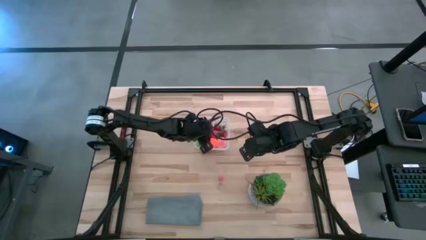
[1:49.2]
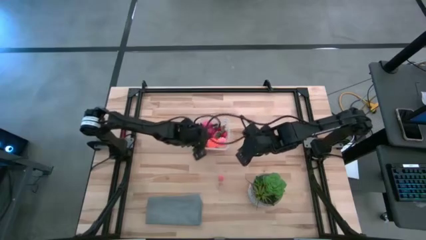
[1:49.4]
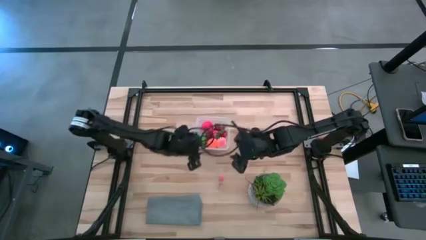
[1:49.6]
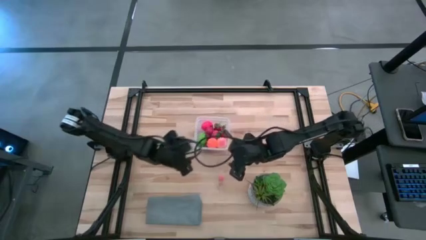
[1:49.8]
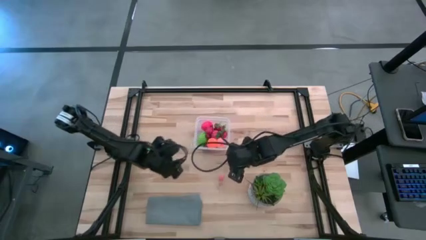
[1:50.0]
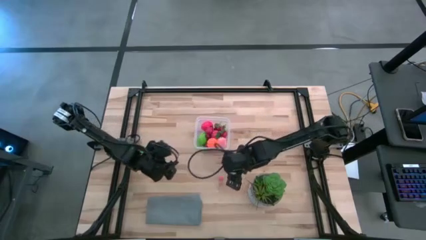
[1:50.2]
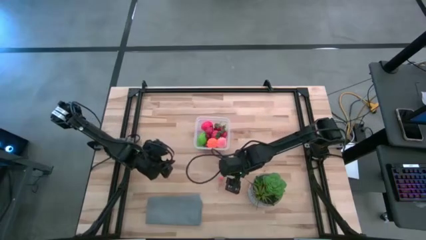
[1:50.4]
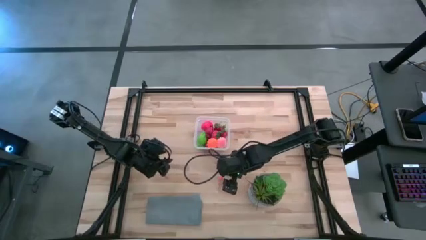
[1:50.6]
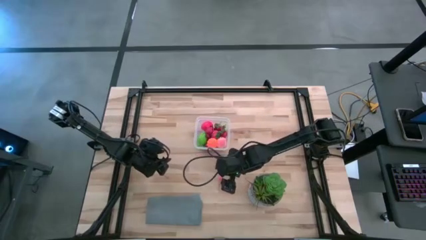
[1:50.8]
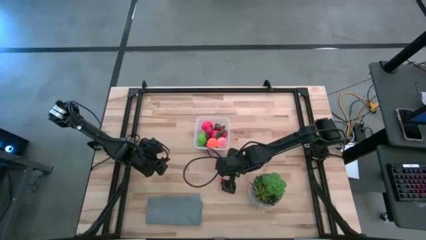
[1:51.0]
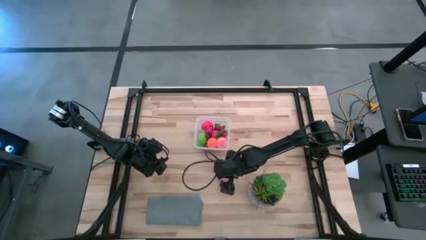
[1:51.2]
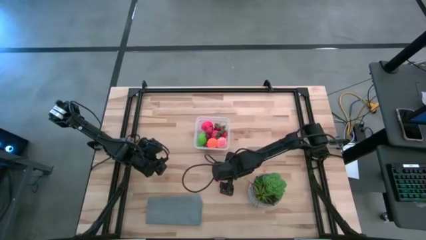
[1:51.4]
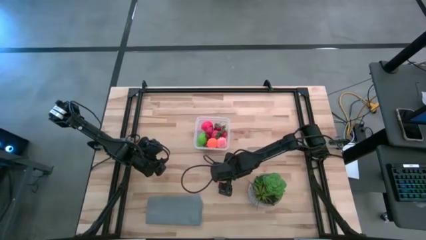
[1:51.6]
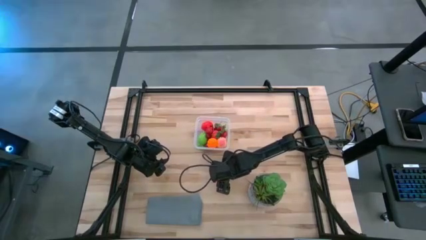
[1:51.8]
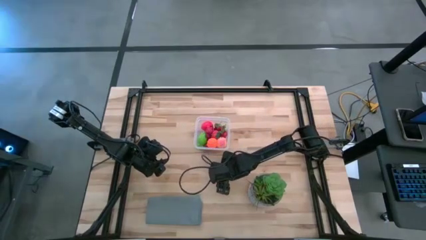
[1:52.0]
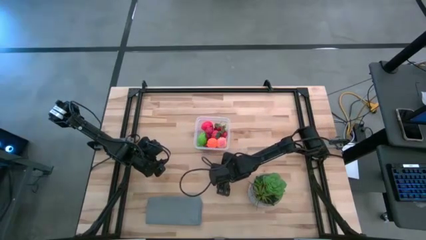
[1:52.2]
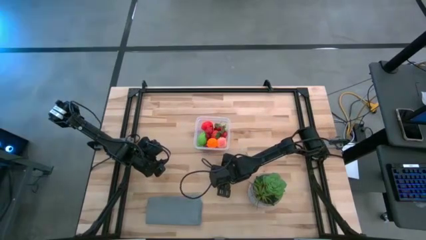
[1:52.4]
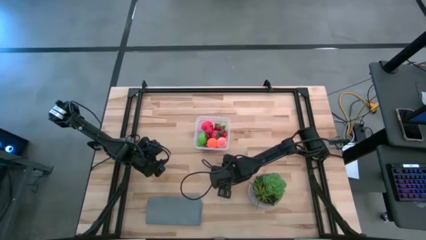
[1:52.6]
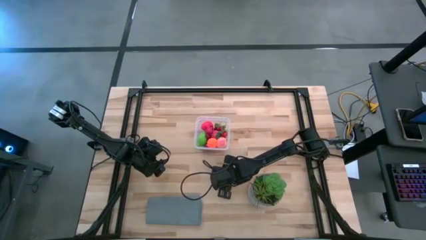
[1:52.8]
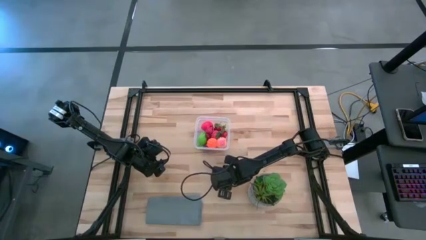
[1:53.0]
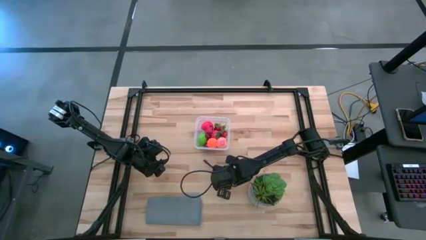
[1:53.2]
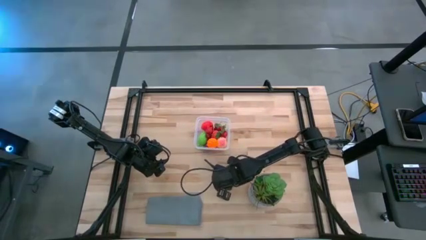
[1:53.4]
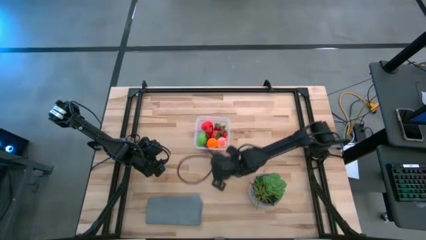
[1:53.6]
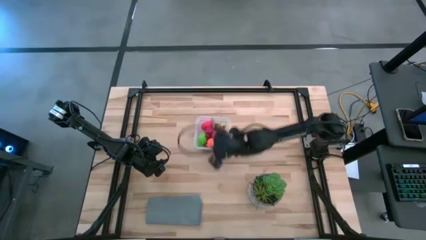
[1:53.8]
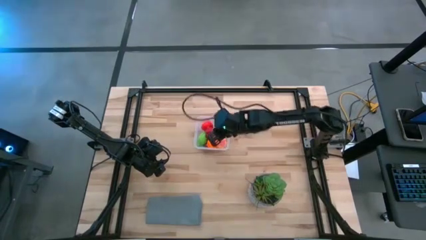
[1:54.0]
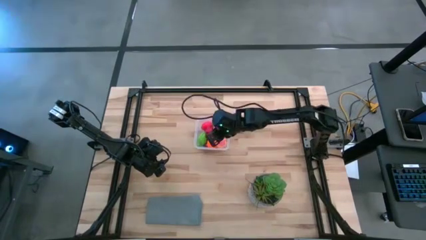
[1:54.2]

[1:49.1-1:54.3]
Task: Pick and placing Produce into tupperware
Put the pink peach into the transparent bin

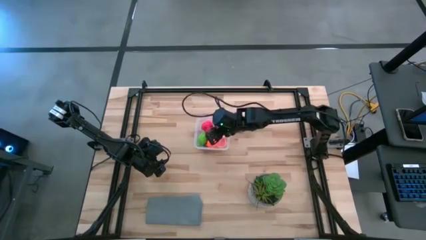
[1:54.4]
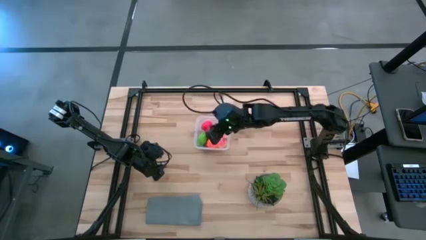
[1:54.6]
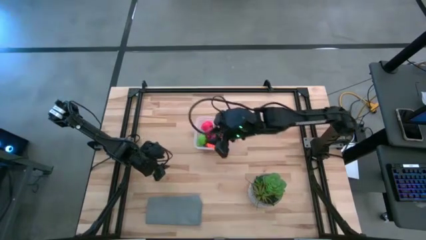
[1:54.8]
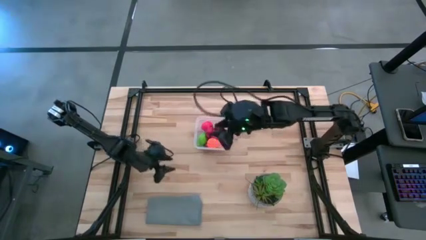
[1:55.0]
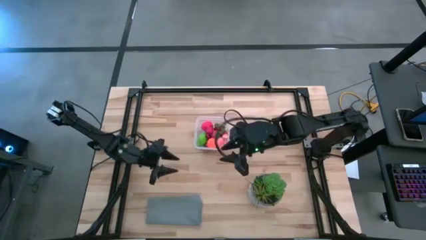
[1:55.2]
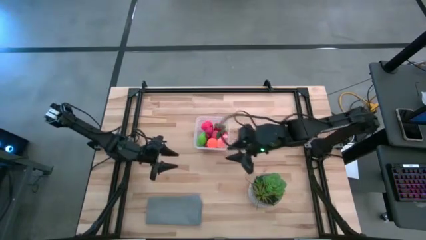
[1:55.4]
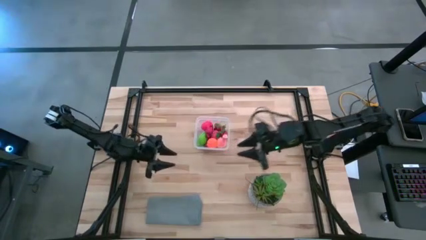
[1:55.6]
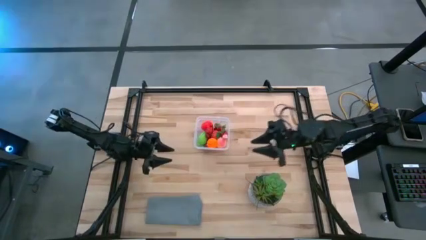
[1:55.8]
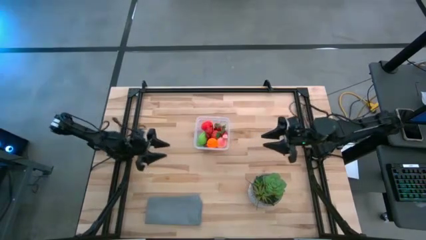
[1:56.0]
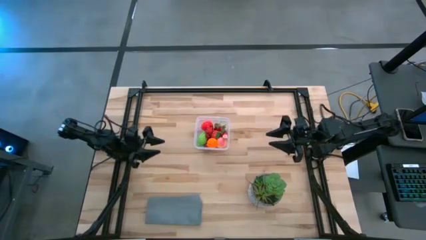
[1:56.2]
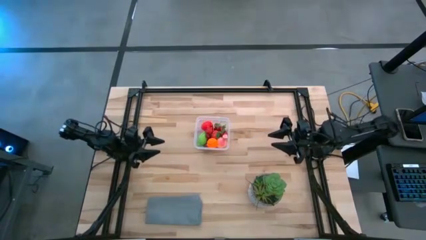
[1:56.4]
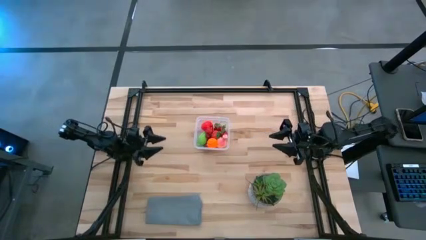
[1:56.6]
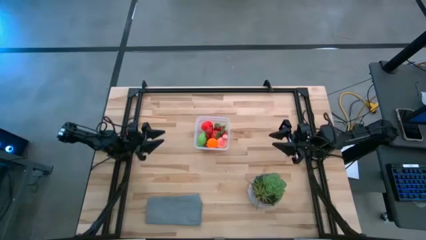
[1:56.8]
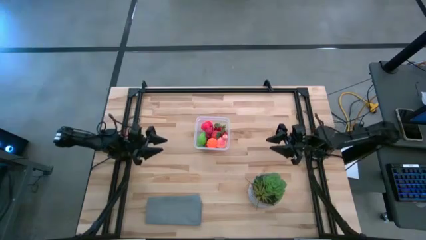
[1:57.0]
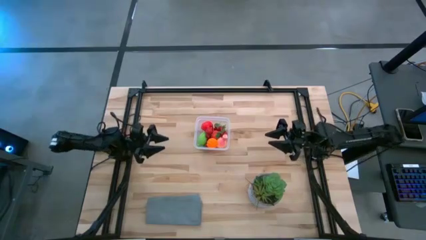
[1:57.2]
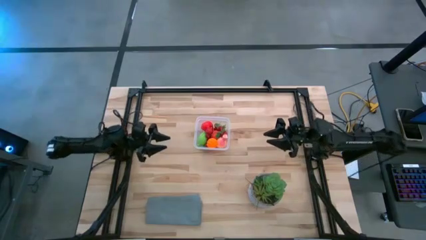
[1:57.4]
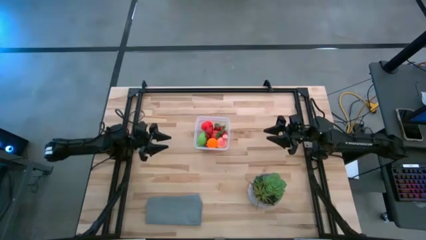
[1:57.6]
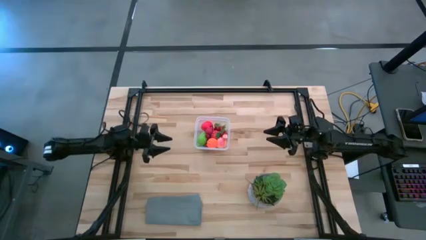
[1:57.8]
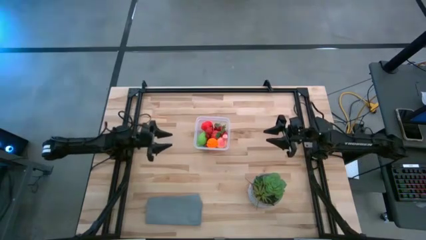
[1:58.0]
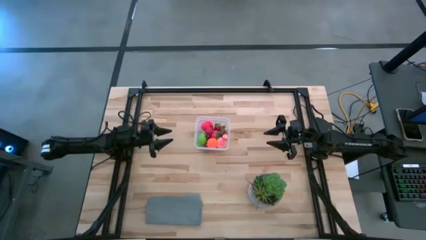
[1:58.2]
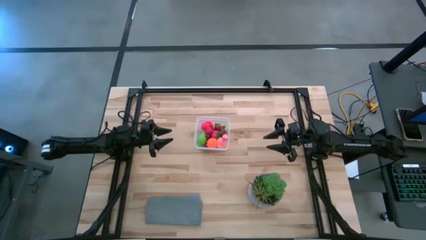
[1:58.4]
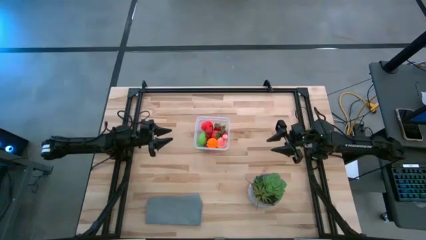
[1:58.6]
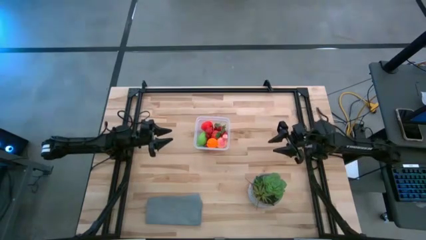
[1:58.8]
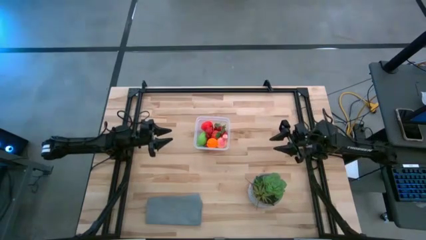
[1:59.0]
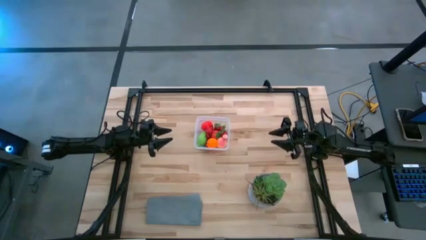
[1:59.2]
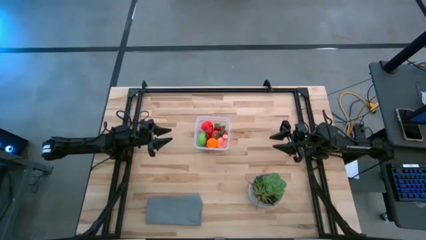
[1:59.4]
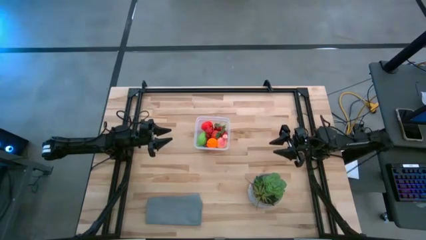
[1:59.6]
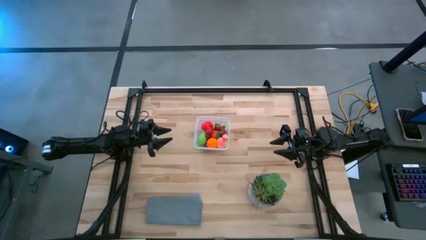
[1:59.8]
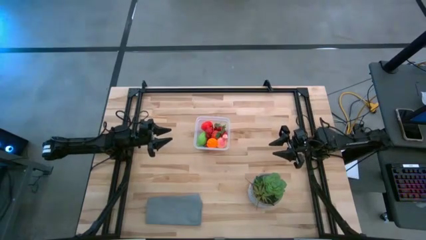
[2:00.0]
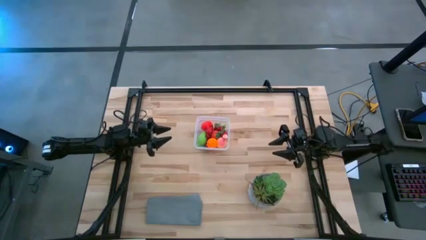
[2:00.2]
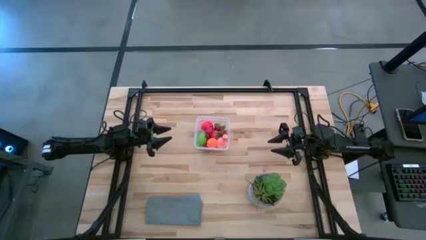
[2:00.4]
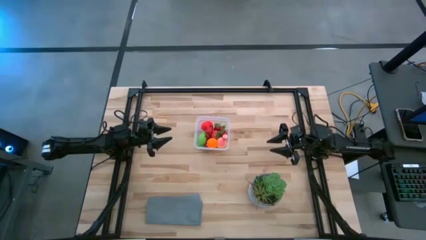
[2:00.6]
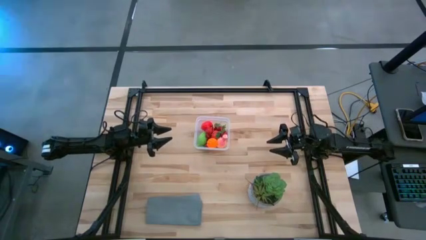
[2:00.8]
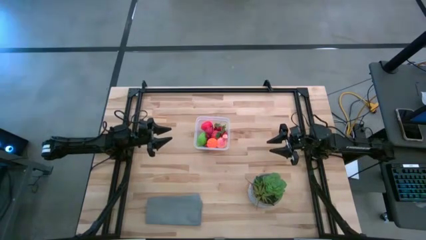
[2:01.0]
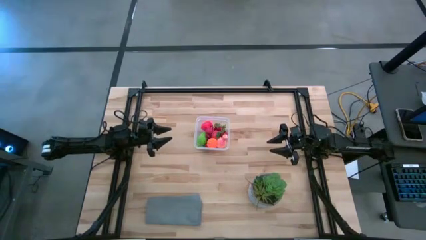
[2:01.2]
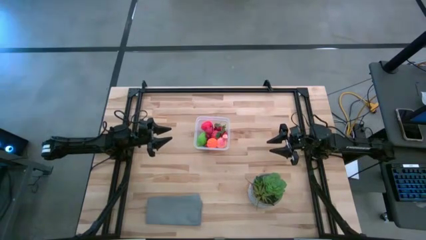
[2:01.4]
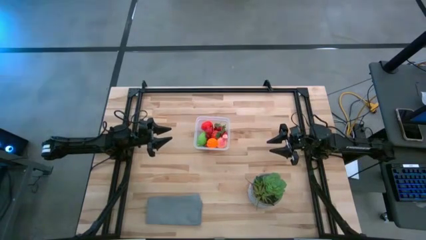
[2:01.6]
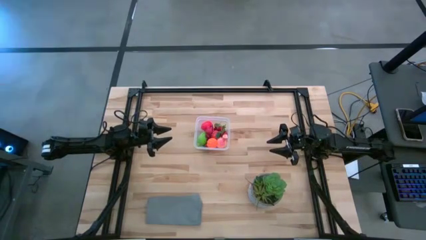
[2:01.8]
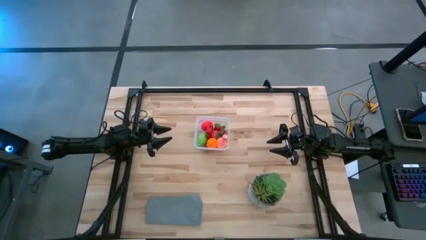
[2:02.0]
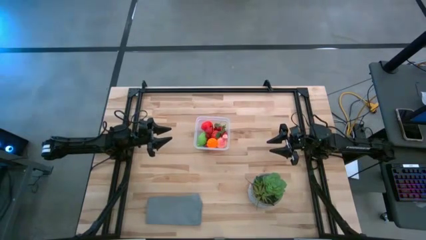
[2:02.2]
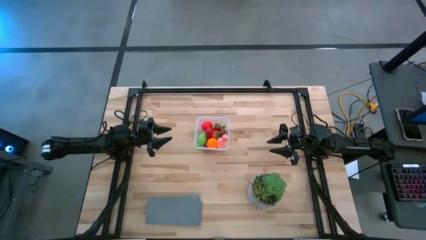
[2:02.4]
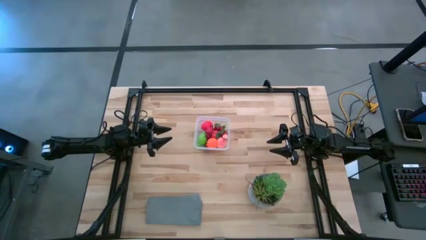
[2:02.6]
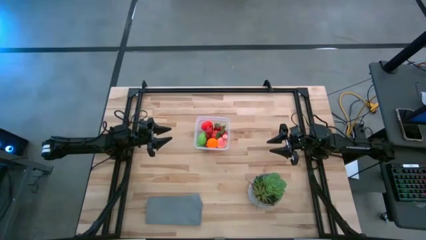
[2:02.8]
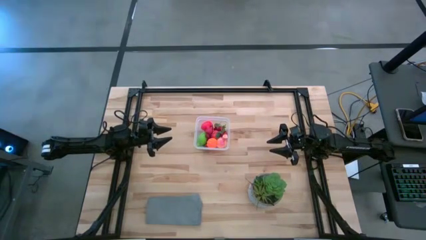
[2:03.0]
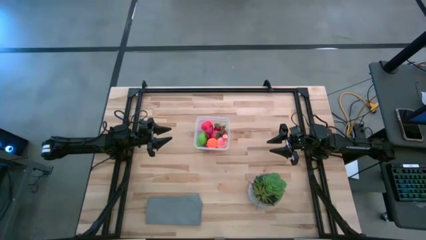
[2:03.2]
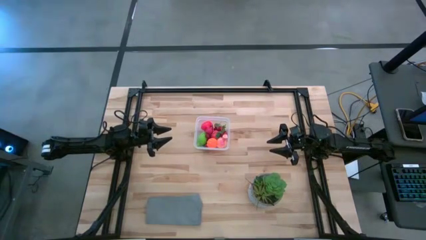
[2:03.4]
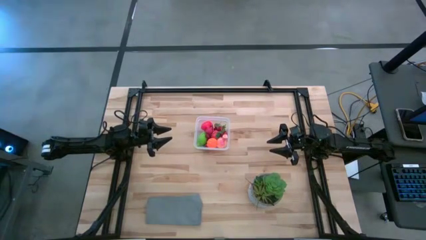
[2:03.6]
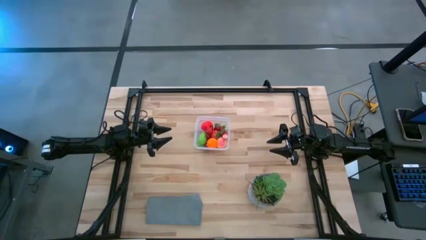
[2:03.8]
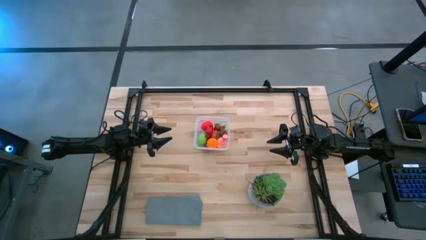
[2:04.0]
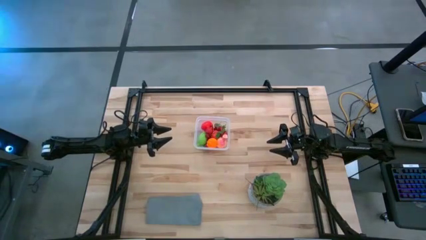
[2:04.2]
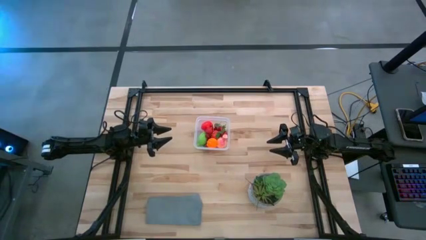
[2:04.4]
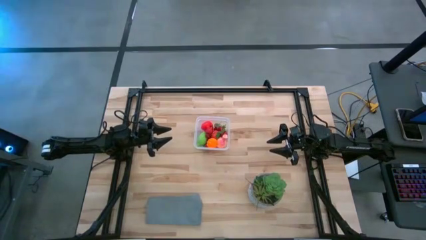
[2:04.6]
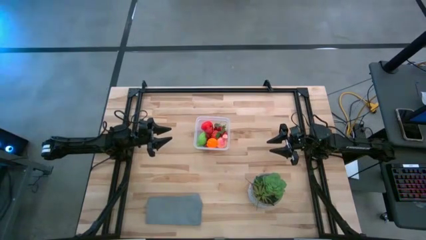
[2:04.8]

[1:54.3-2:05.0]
Return to Home Position

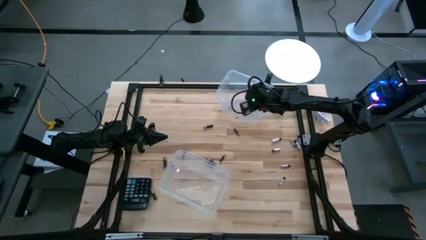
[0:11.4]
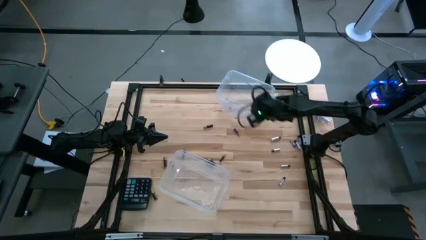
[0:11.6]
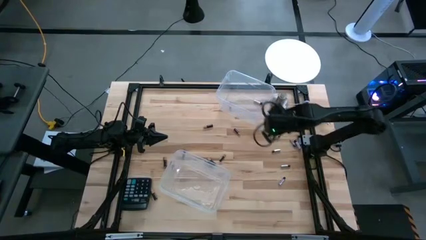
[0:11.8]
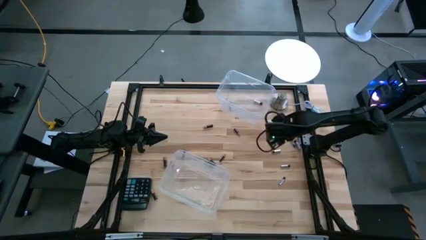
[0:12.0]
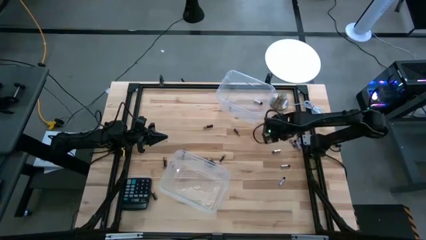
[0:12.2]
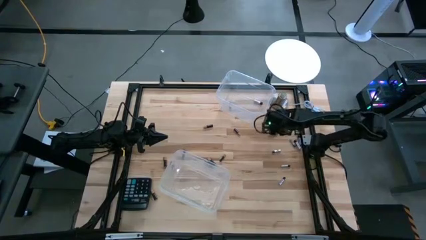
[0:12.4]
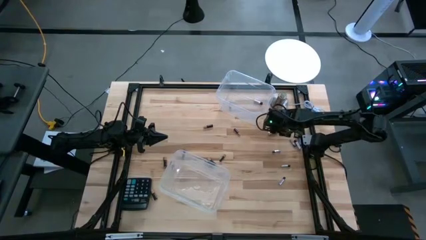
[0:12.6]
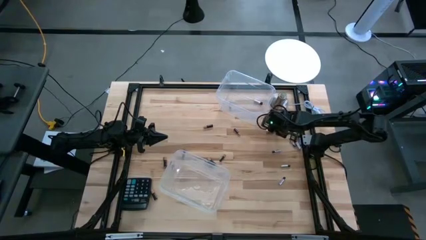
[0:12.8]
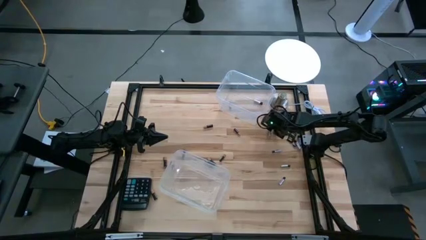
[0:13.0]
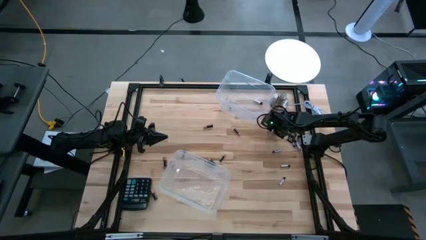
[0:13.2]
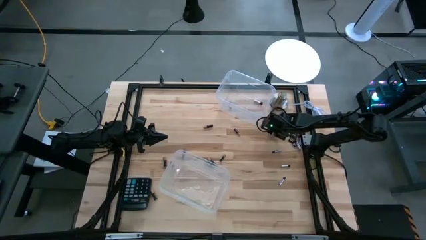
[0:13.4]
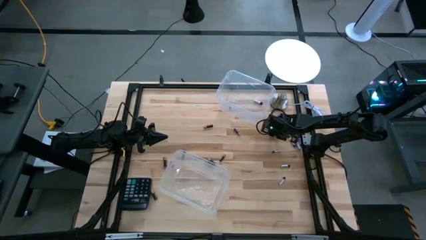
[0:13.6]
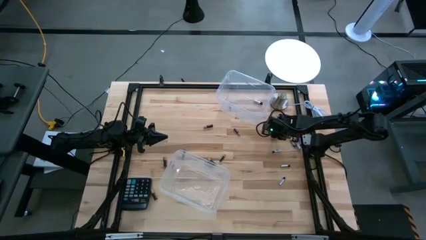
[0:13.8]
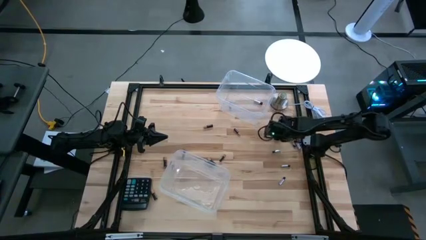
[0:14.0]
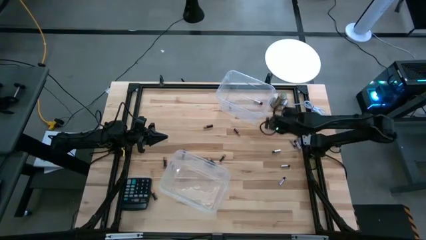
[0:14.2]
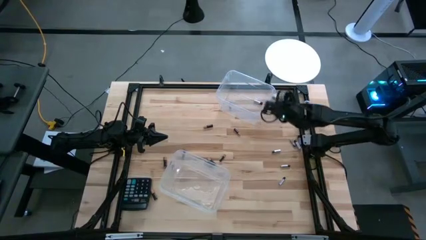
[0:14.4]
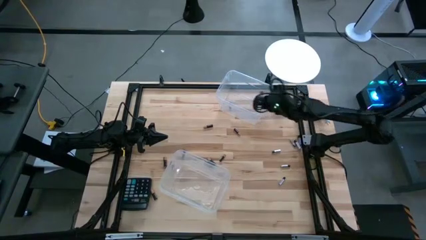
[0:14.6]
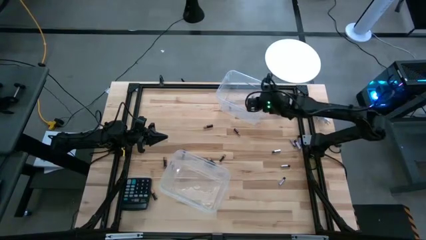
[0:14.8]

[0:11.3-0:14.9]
Task: Sort batteries
Put the silver battery into the top transparent bin
